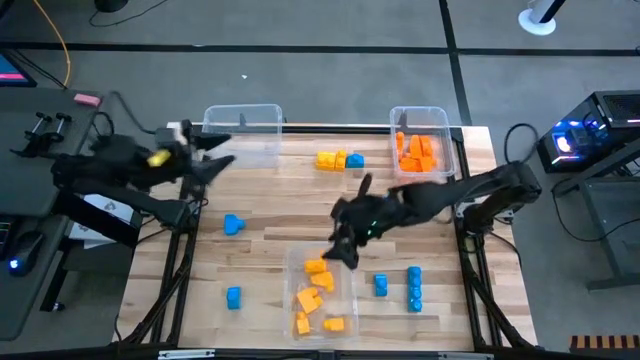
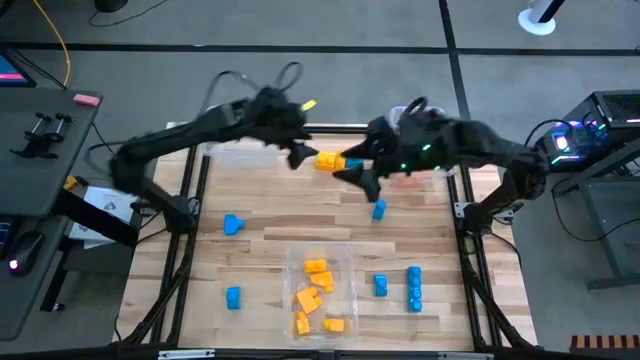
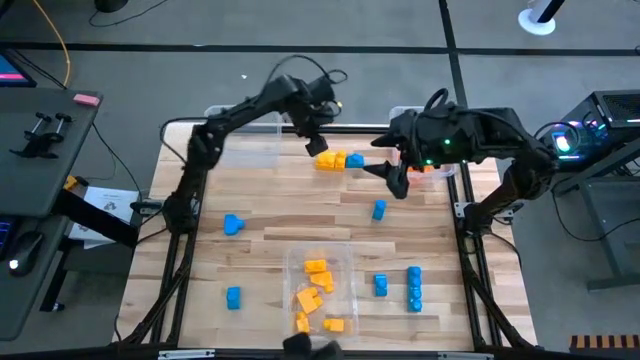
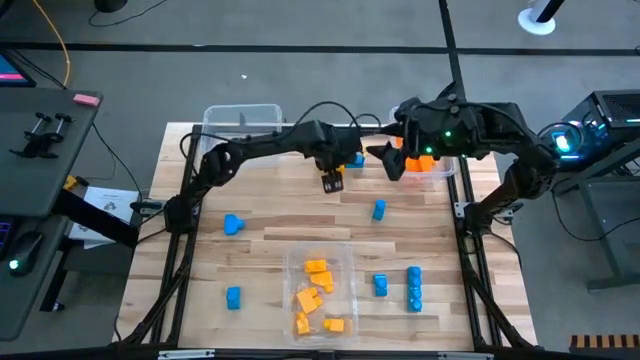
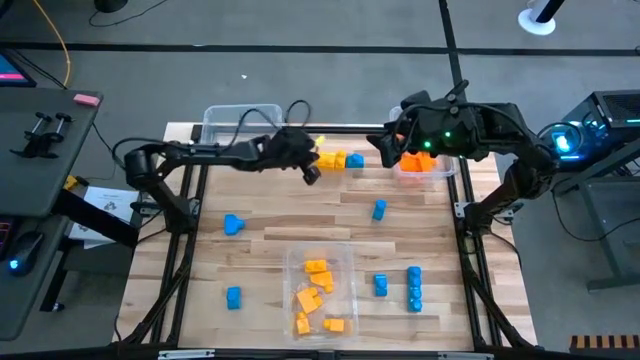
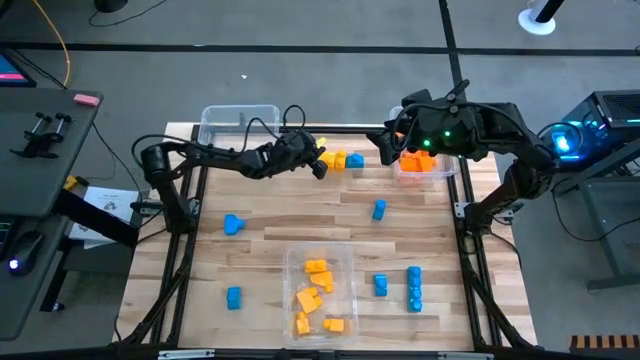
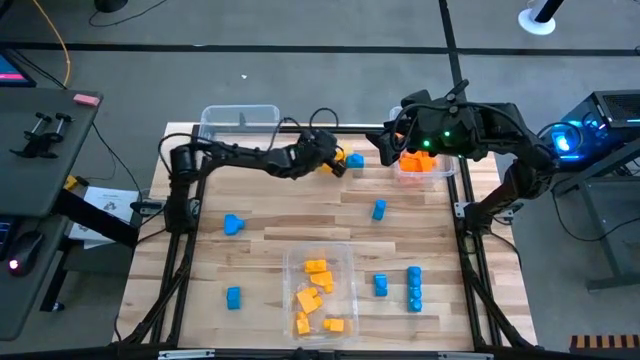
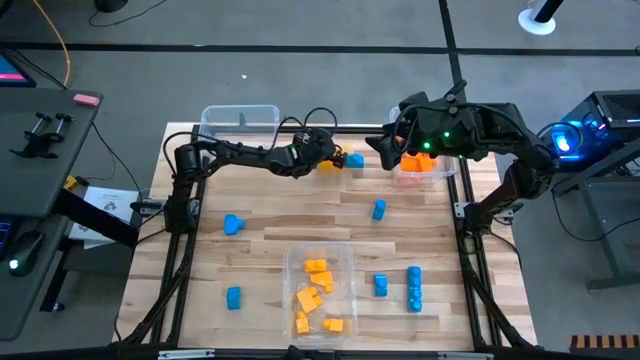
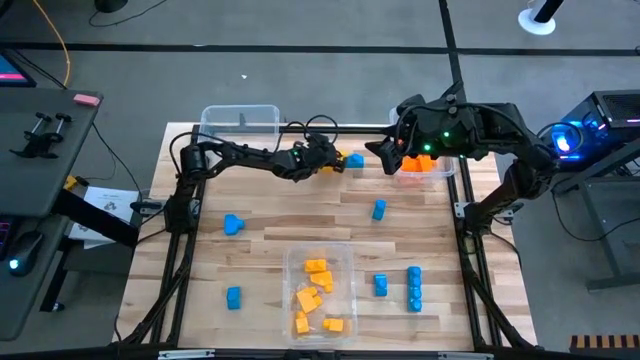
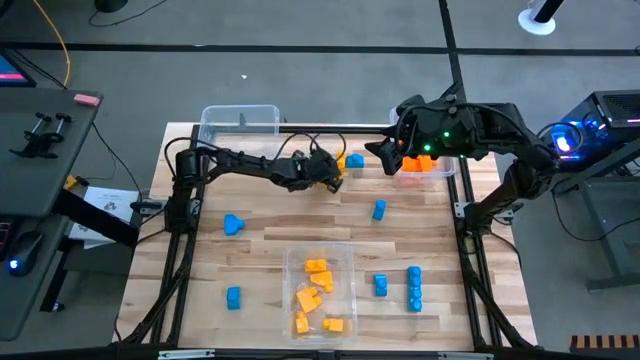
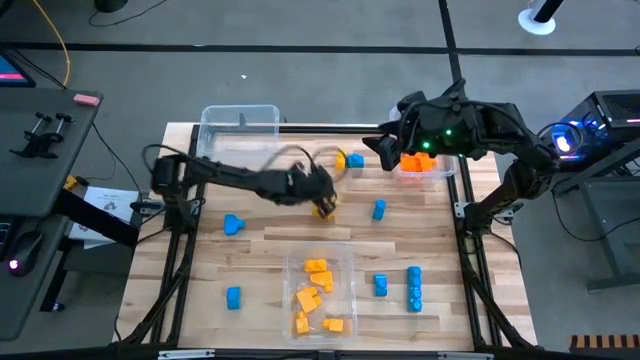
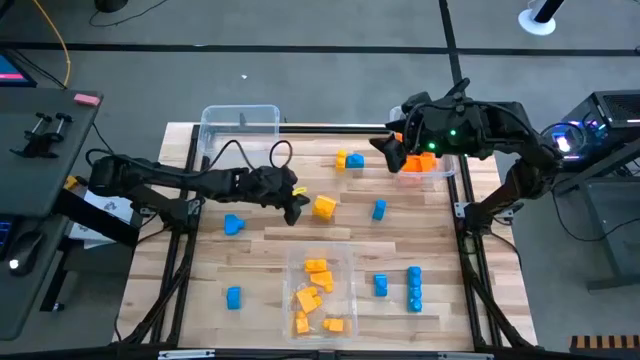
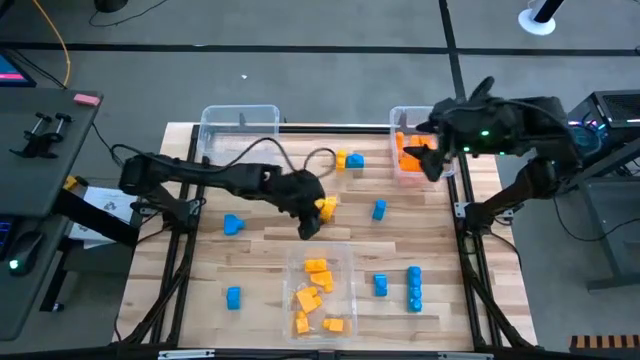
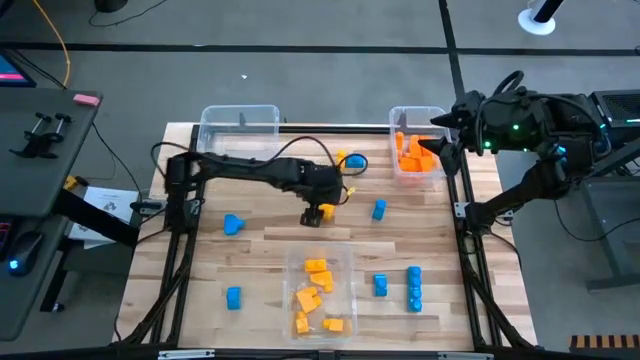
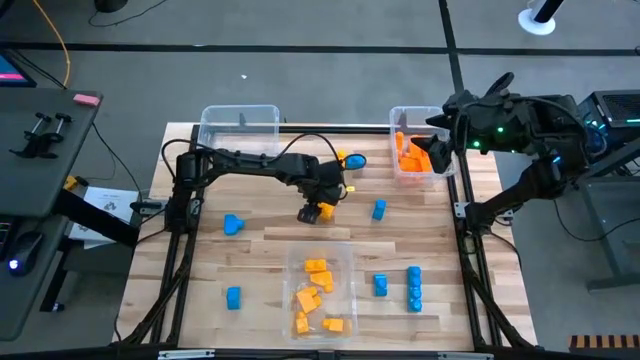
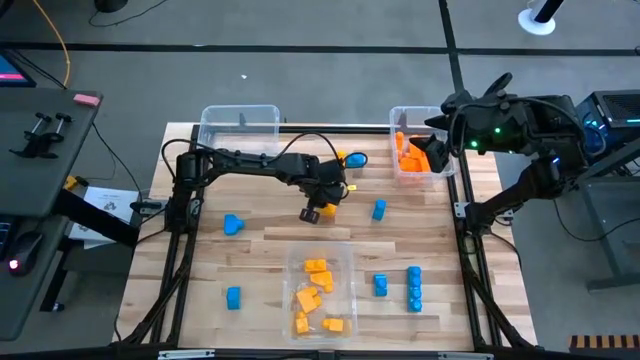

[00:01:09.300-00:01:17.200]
Task: Sort blocks
Put the yellow game piece into the bottom transparent bin

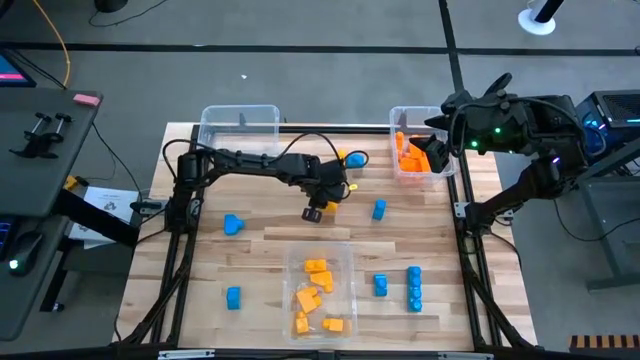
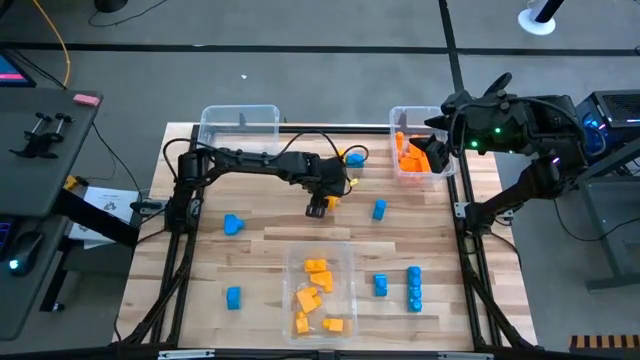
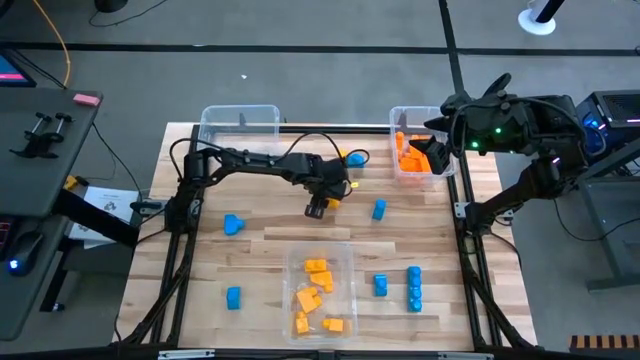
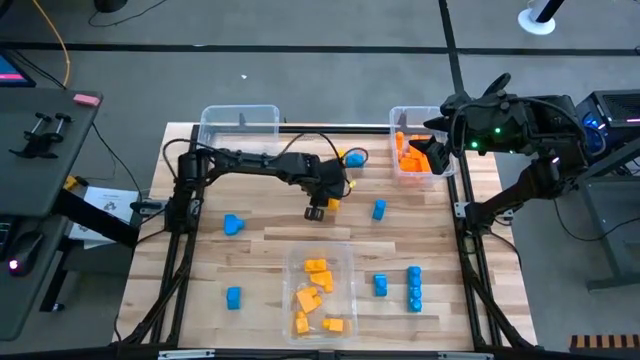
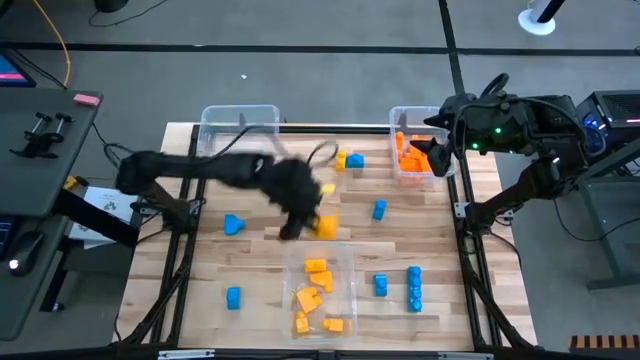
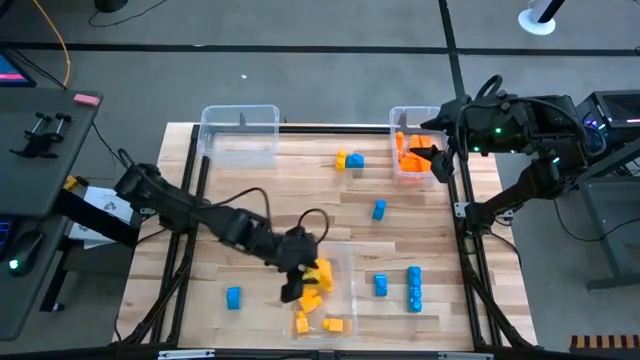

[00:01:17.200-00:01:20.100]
Put the yellow game piece into the bottom transparent bin

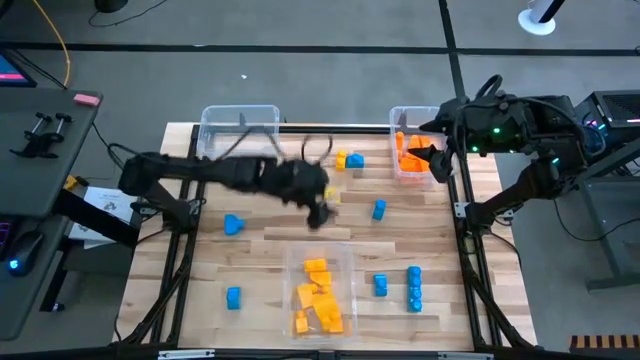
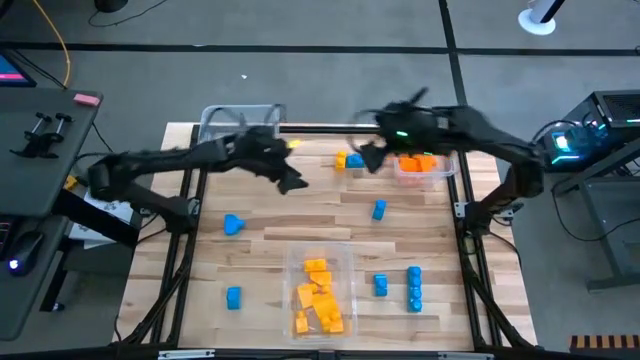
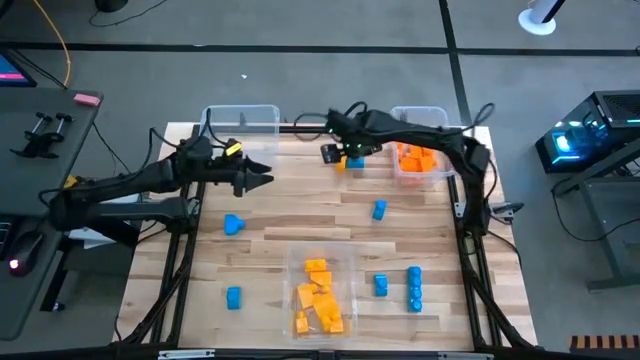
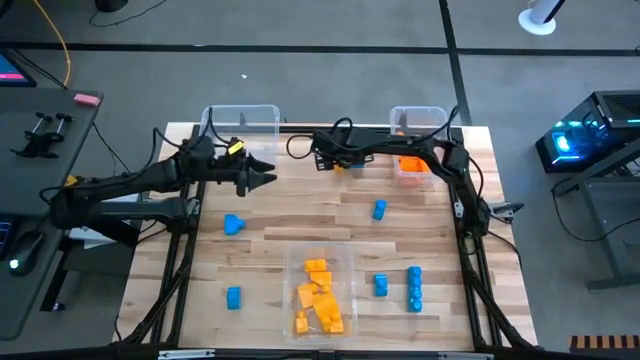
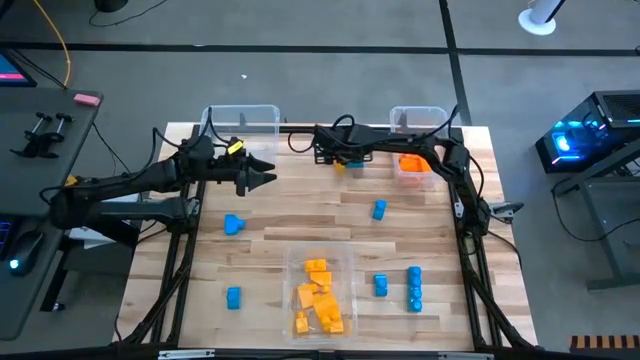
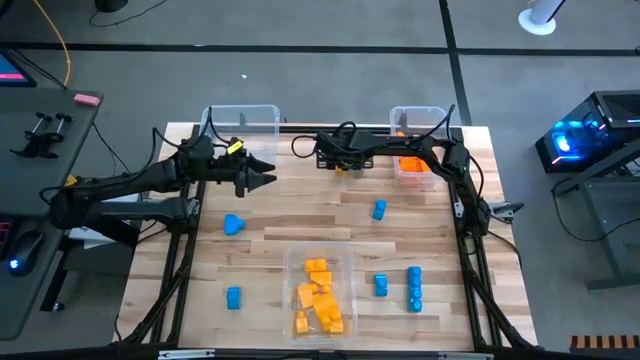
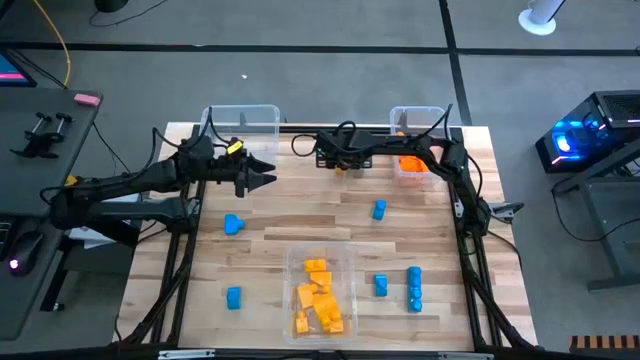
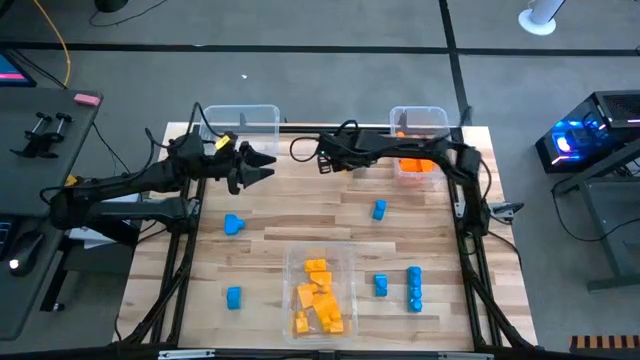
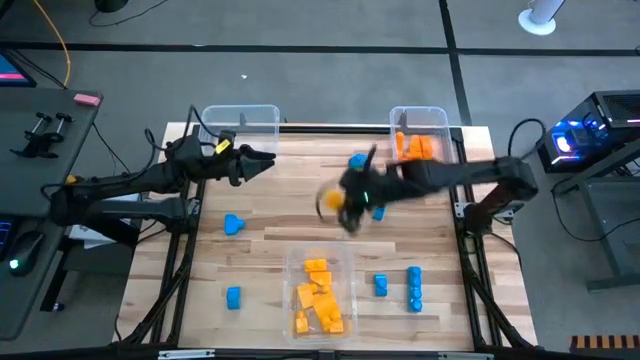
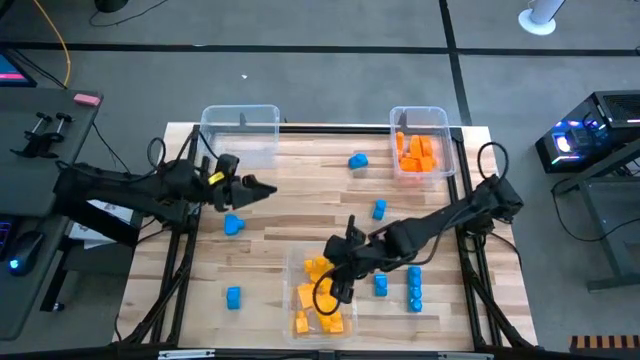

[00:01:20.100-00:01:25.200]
Put the yellow game piece into the bottom transparent bin

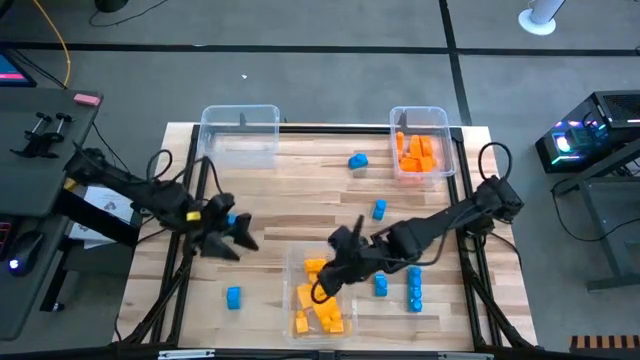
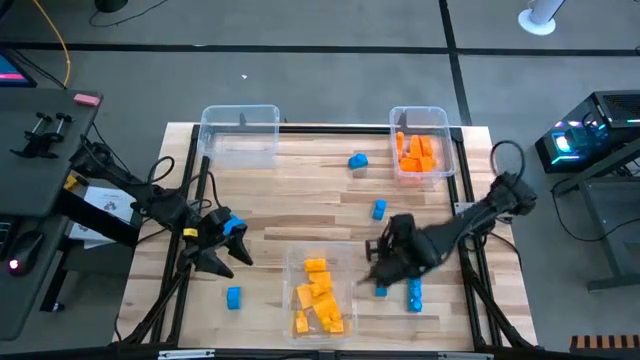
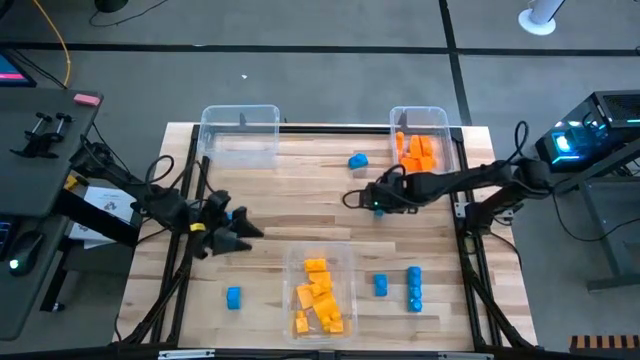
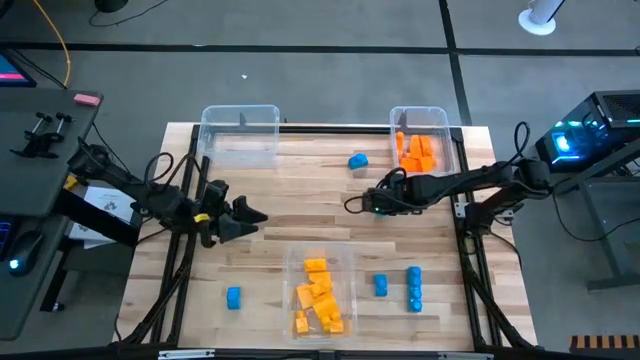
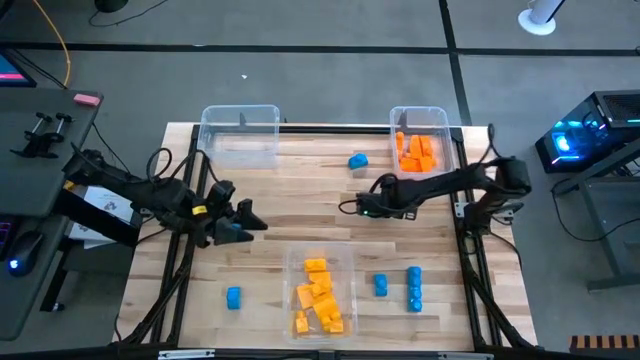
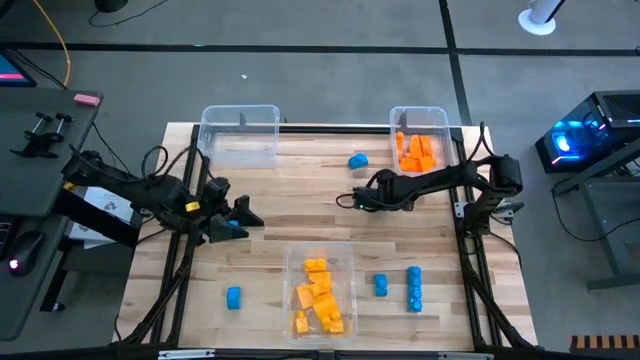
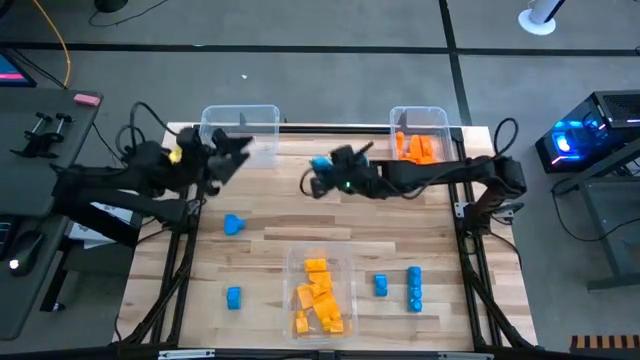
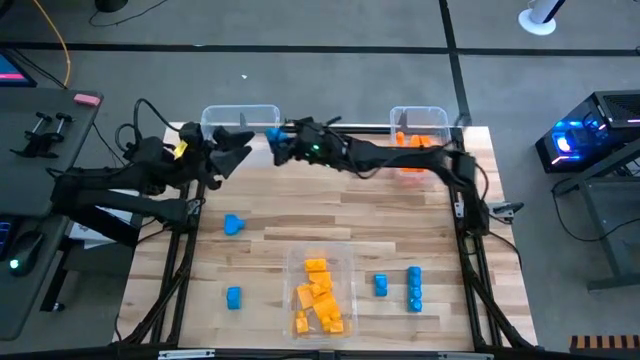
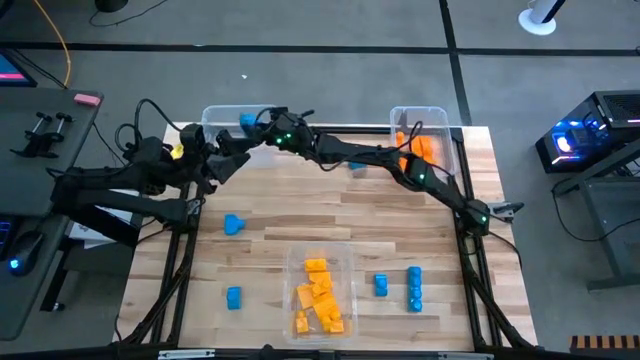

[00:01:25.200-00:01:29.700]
Put the blue game piece into the top left transparent bin

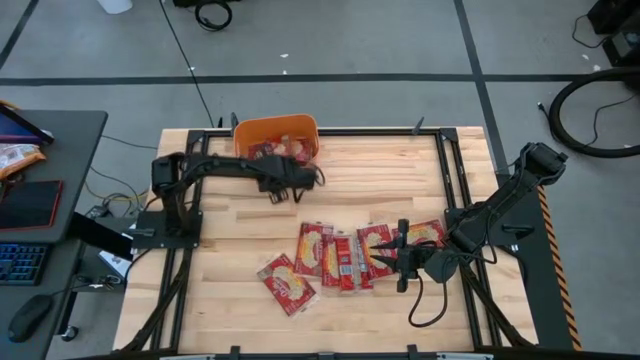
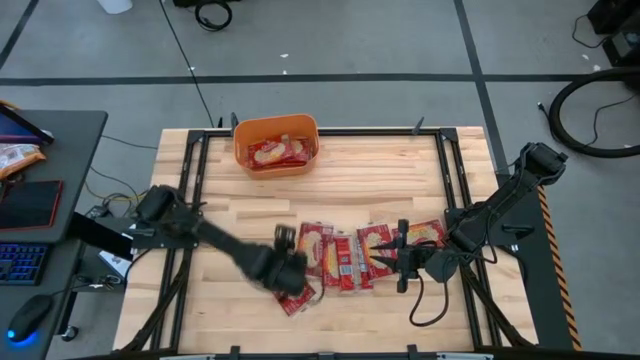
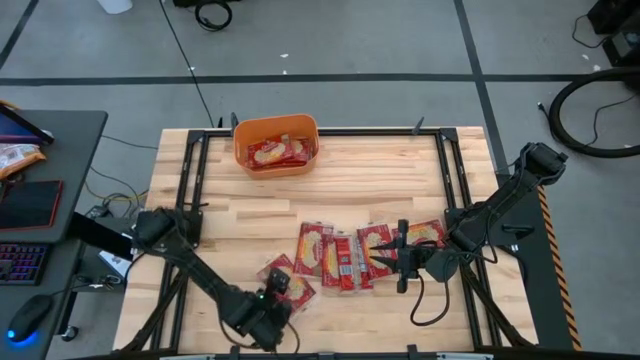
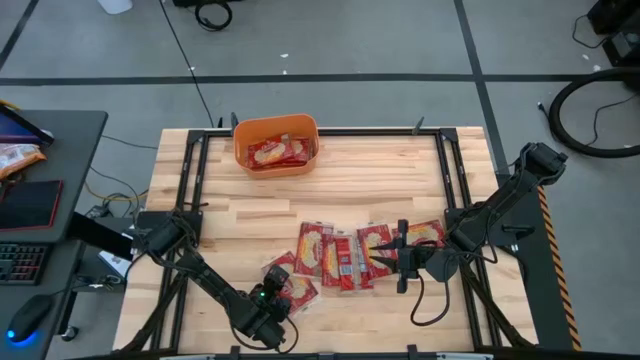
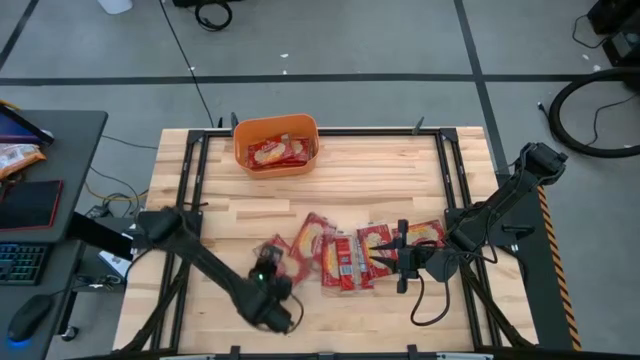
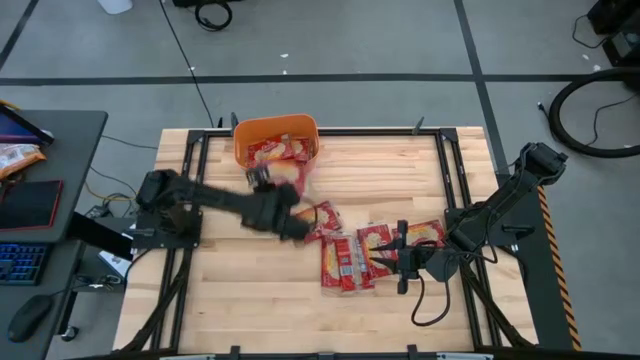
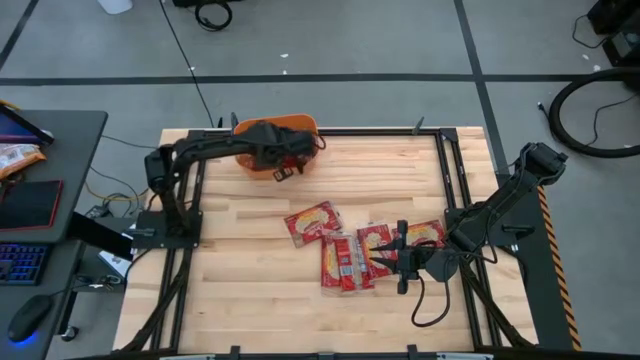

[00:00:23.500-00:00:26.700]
Task: Sort popcorn bags into baskets
Put the red popcorn bag into the orange bin
